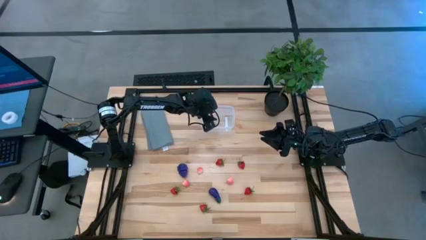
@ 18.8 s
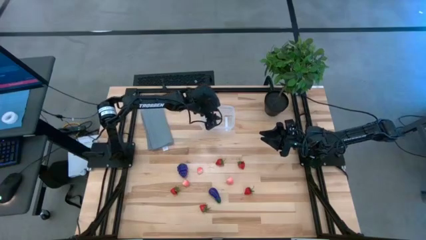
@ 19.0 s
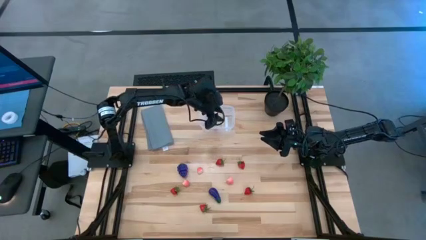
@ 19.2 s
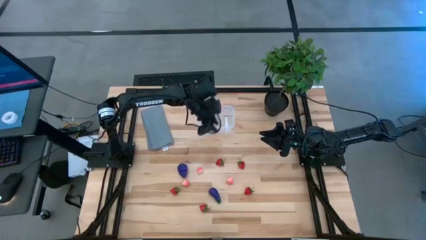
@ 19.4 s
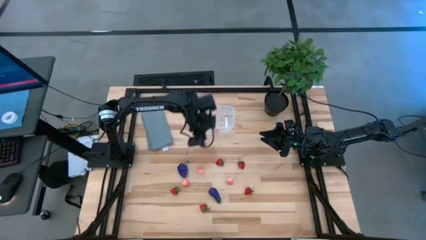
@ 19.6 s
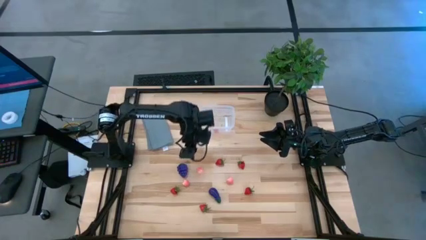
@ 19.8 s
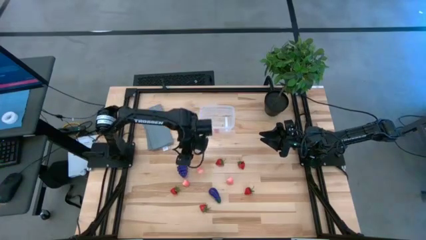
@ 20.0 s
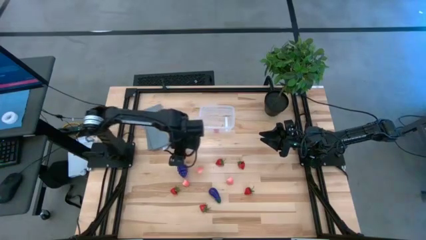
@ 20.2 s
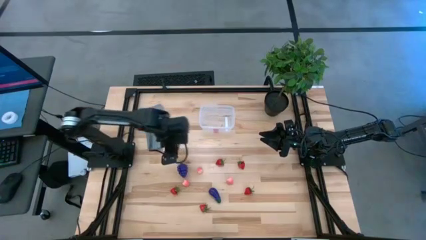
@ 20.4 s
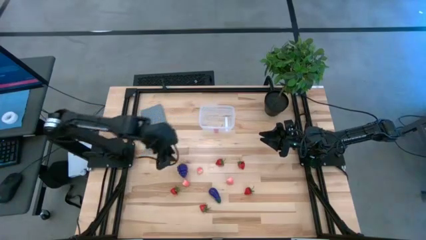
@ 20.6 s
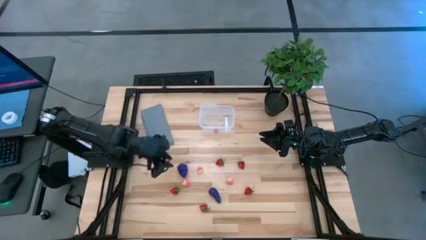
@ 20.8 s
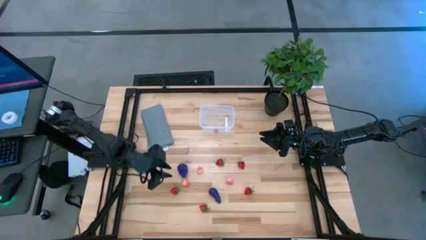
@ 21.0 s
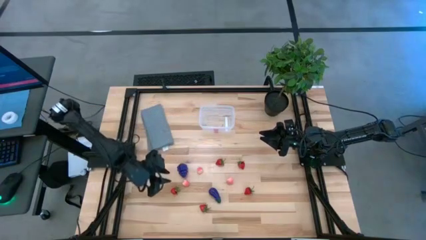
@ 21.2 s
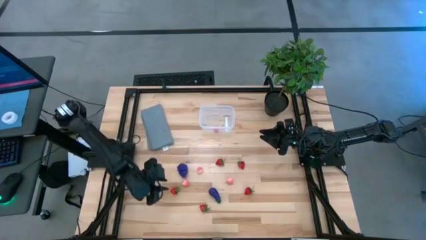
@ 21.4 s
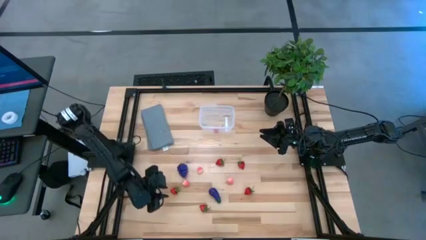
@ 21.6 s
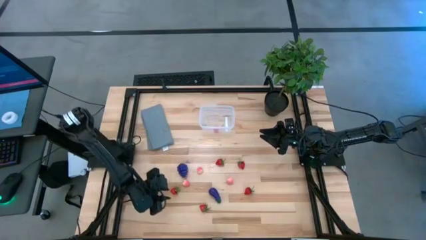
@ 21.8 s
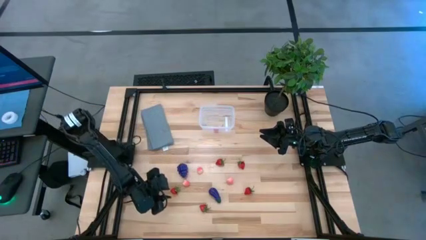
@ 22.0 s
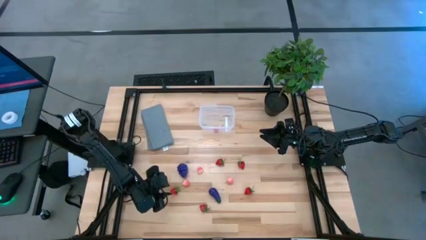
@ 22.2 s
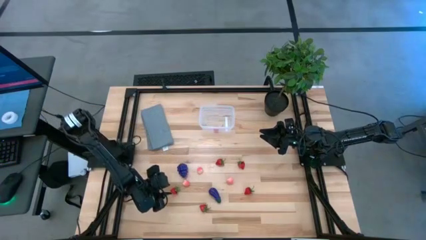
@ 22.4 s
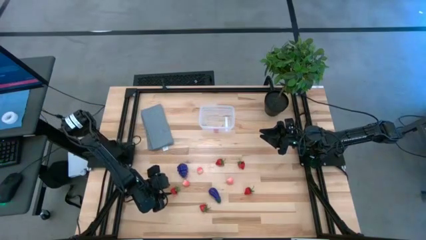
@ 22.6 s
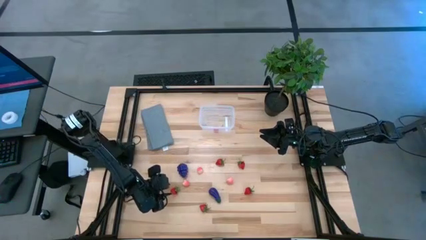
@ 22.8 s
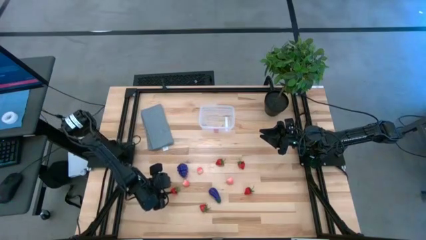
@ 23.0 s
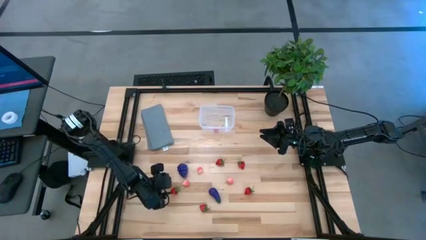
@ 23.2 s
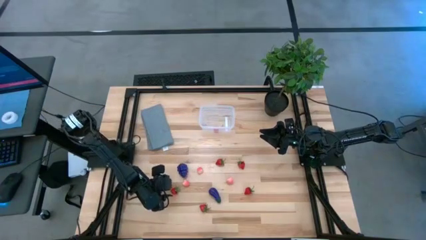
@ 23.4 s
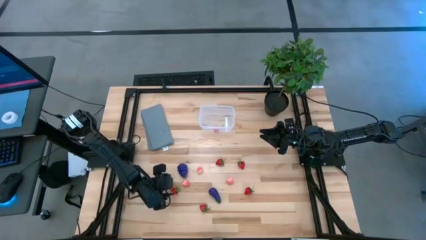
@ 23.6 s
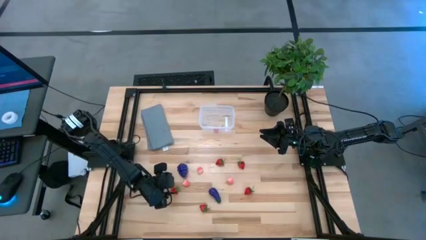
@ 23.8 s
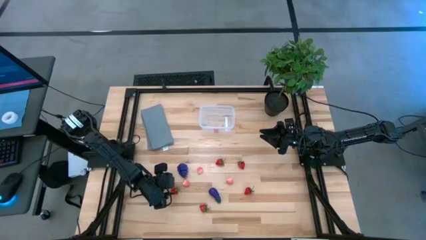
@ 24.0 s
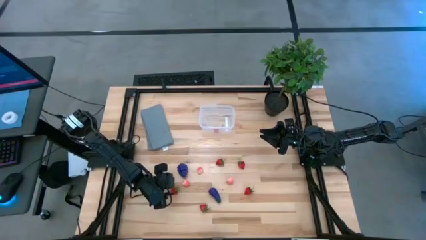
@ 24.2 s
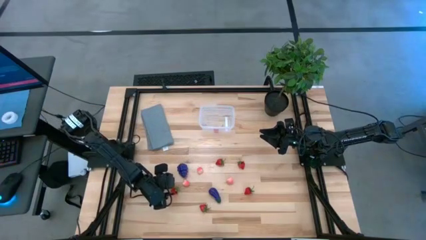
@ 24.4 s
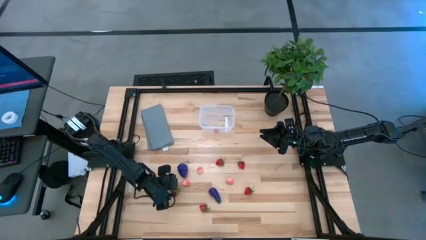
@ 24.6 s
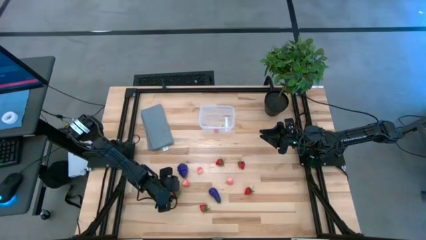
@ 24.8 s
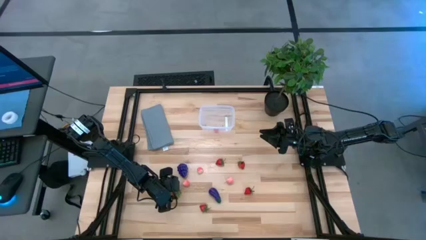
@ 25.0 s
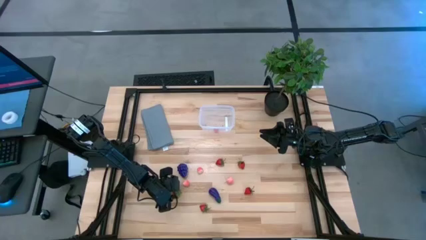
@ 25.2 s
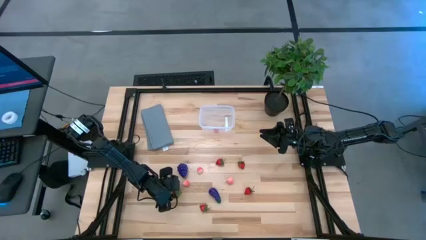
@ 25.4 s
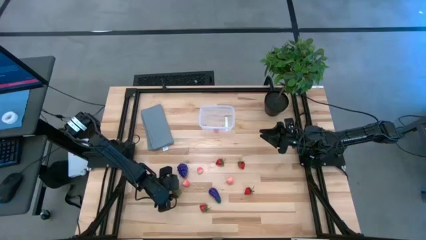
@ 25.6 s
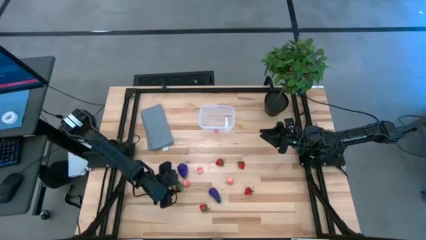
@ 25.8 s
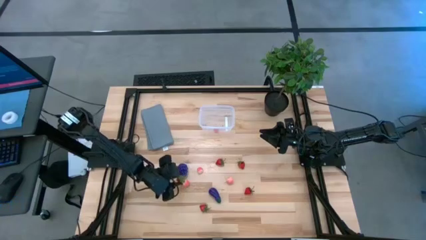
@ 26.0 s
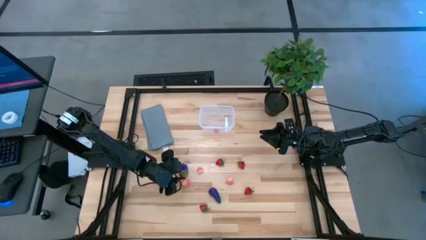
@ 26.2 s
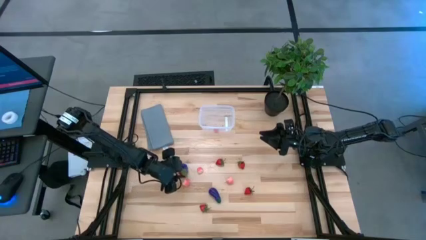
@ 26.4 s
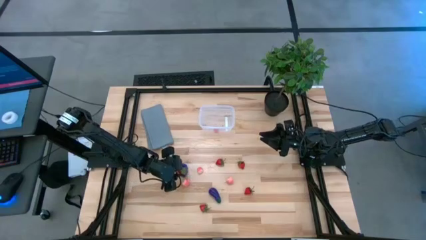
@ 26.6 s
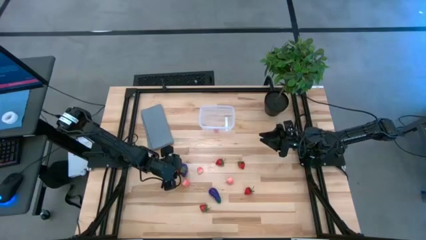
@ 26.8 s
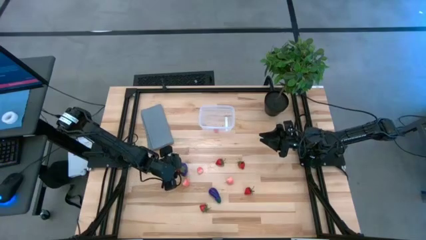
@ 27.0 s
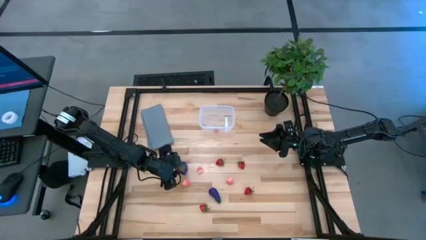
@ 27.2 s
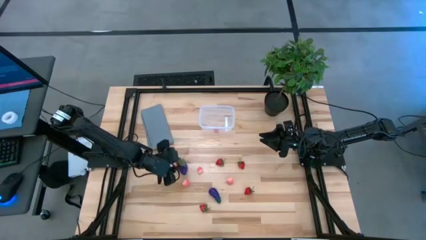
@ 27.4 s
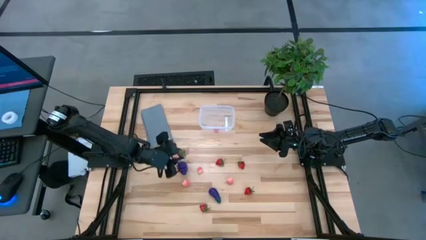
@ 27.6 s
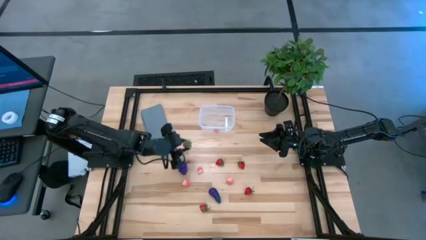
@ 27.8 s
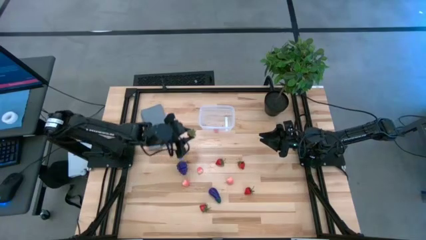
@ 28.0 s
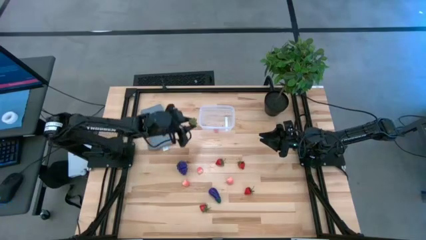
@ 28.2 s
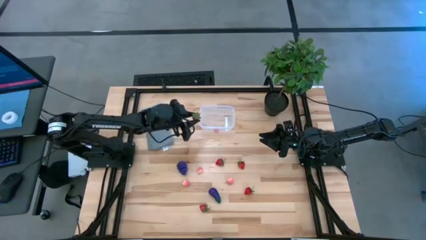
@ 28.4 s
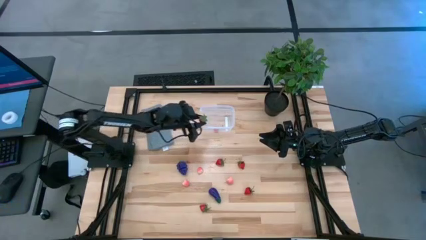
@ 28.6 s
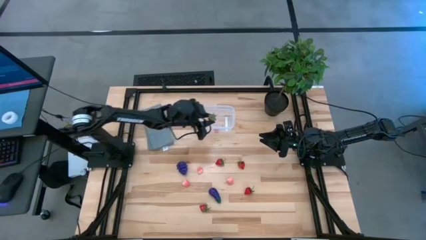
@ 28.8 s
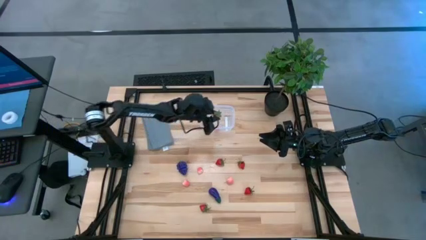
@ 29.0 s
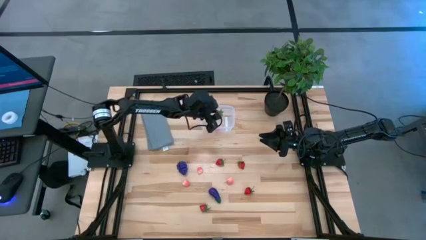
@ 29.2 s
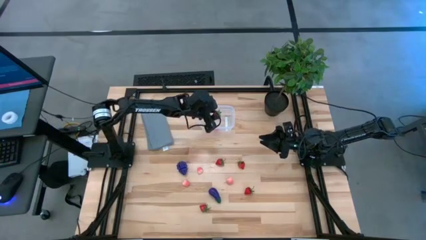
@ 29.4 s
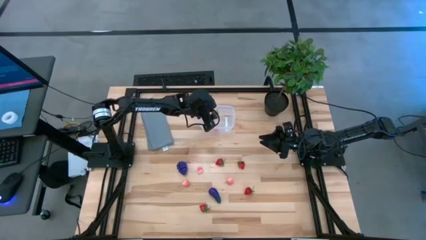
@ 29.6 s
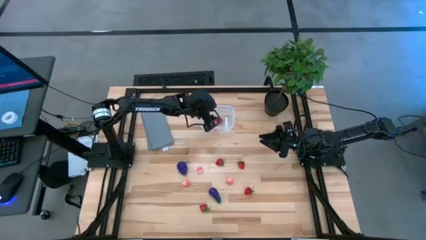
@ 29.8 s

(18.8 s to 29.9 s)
Task: Pick and placing Produce into tupperware
Put the strawberry into the transparent bin

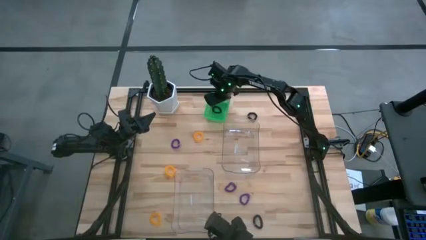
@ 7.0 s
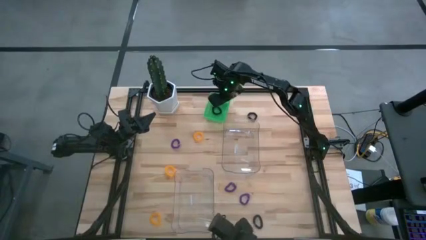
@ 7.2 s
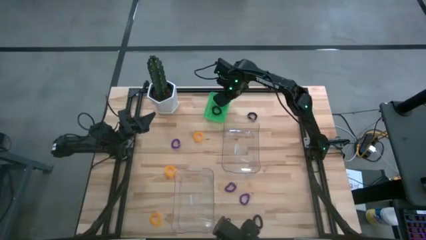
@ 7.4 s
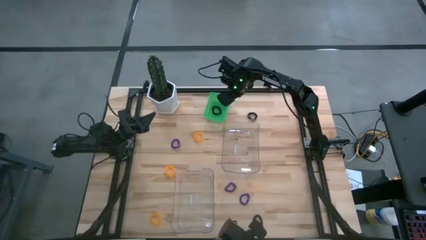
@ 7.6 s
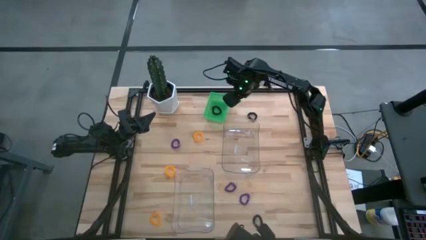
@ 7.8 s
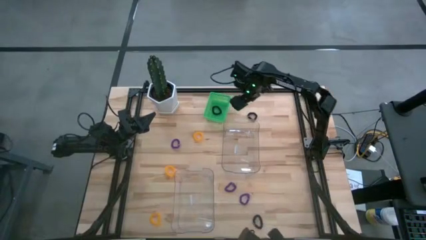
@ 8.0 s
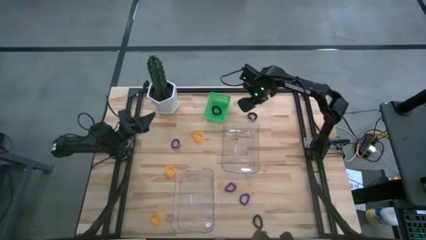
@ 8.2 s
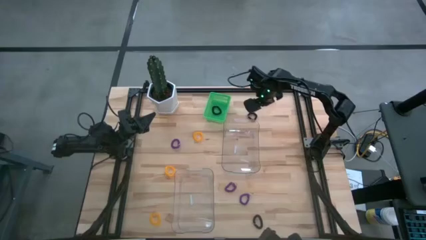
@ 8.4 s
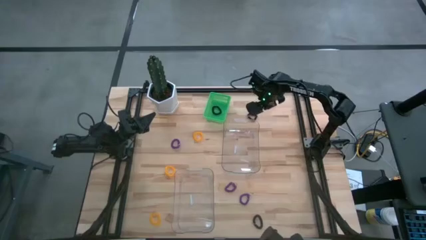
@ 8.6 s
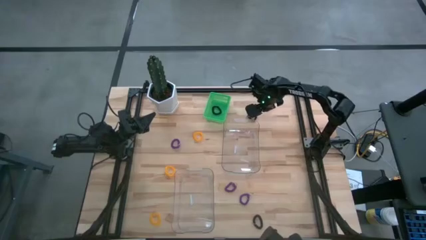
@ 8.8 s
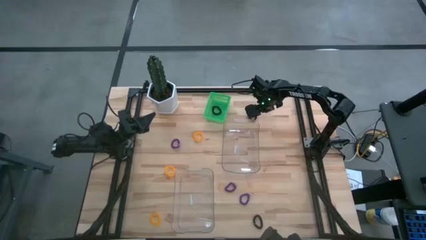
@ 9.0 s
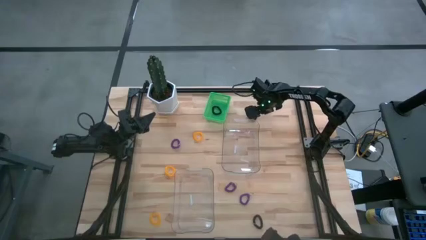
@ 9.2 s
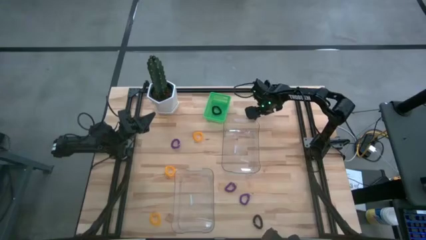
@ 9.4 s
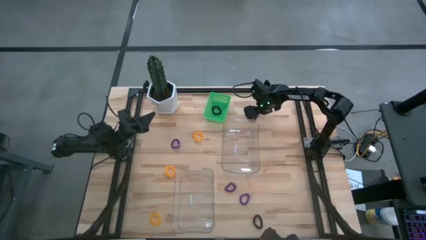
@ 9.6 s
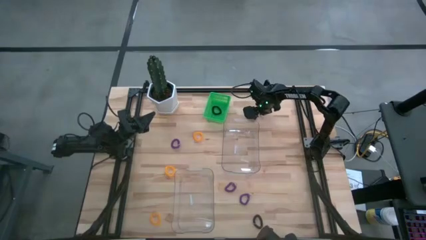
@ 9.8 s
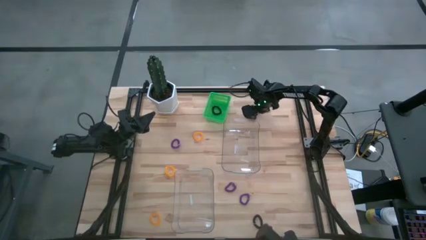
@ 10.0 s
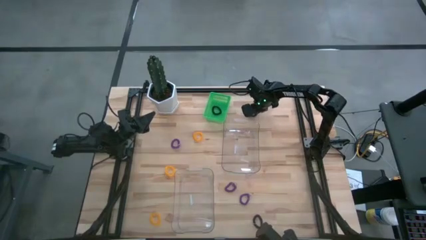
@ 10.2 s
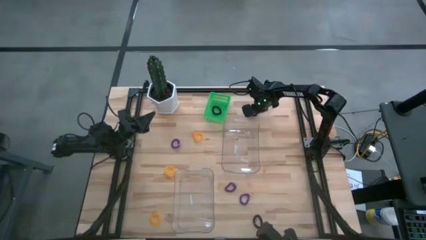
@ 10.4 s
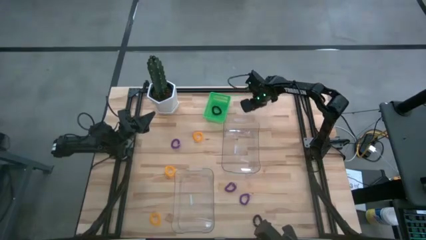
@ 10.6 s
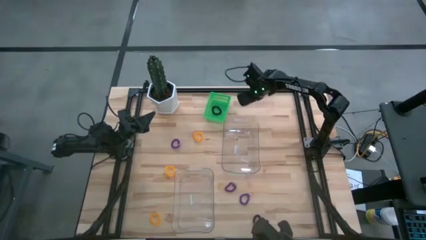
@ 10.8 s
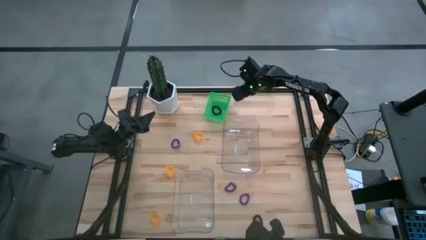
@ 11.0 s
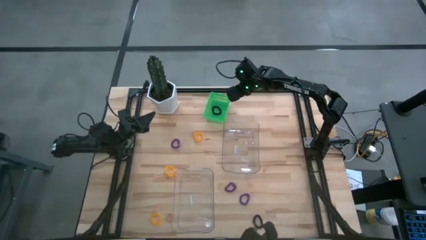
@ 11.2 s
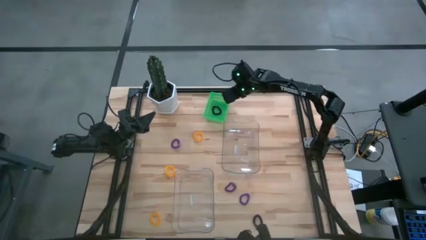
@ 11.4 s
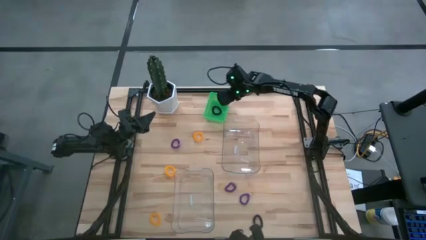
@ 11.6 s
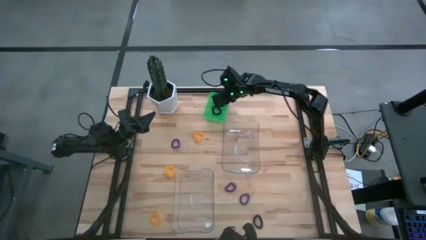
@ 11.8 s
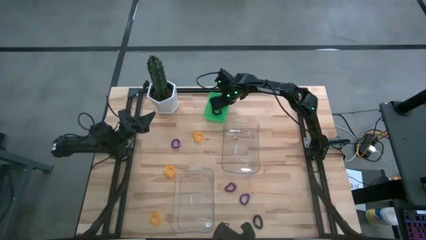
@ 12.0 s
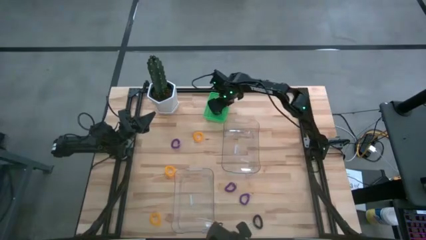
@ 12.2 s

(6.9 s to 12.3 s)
Task: Sort spring keychains
Put the top black spring keychain into the green bin
